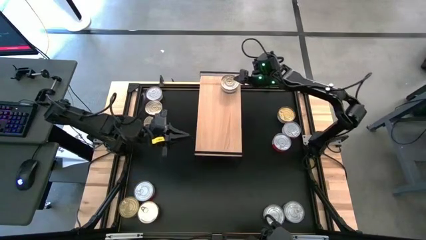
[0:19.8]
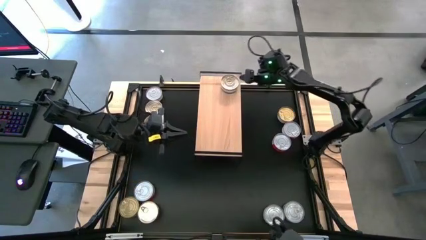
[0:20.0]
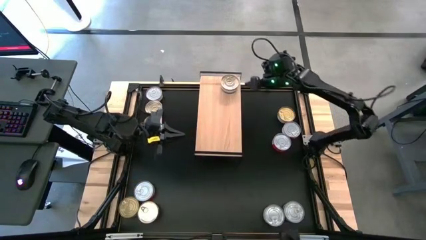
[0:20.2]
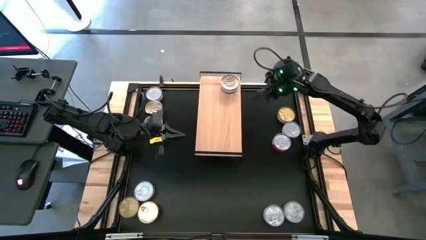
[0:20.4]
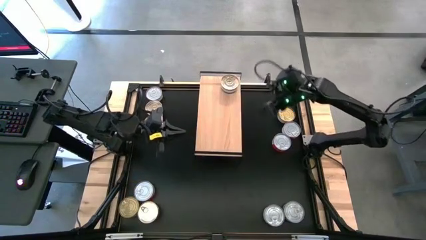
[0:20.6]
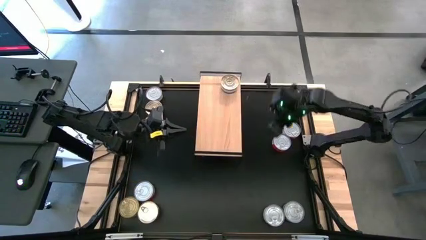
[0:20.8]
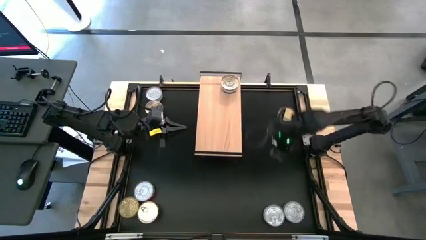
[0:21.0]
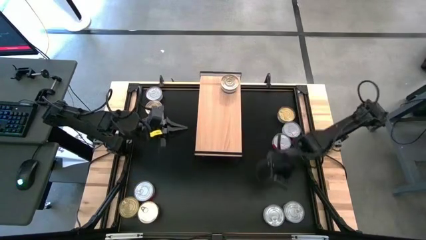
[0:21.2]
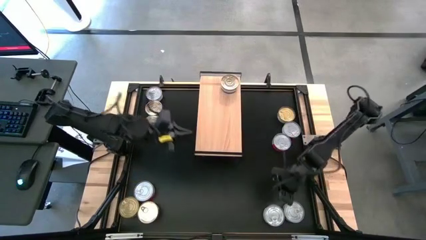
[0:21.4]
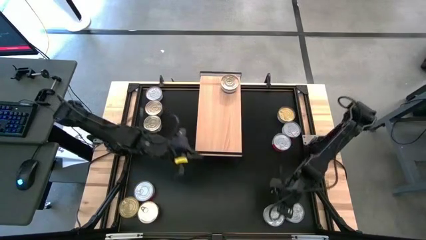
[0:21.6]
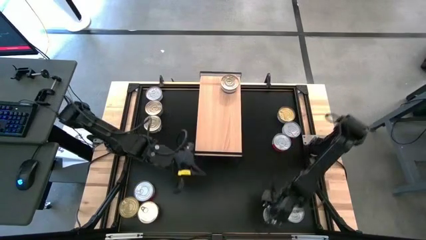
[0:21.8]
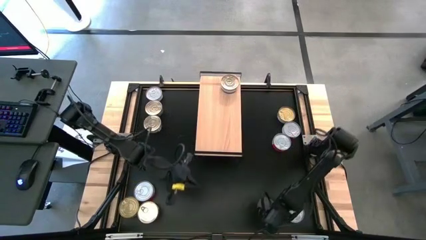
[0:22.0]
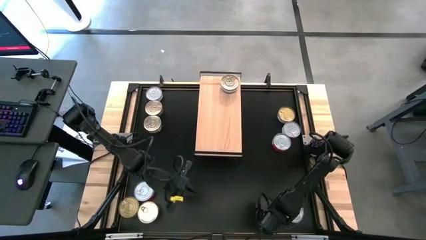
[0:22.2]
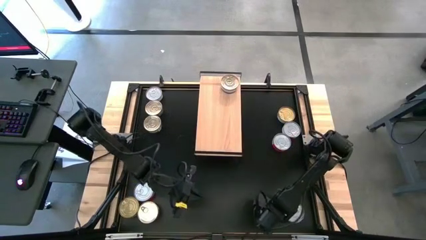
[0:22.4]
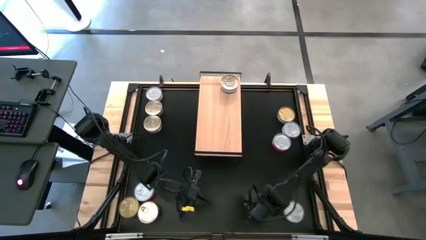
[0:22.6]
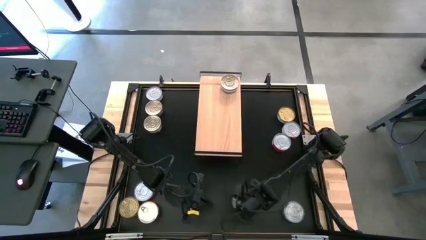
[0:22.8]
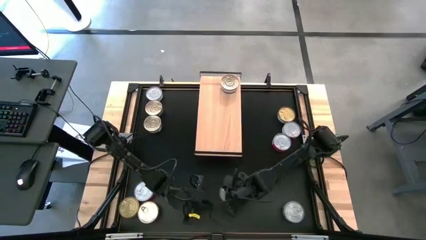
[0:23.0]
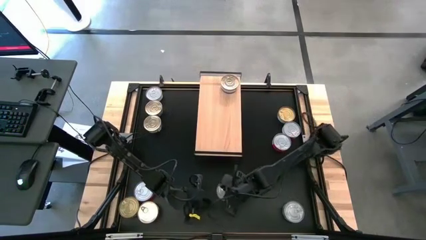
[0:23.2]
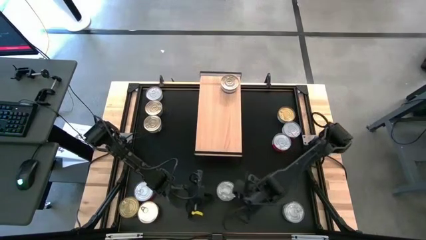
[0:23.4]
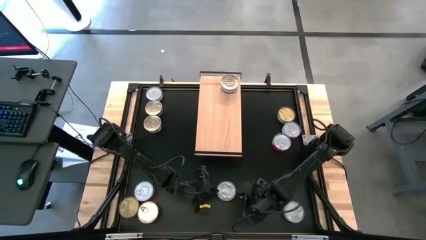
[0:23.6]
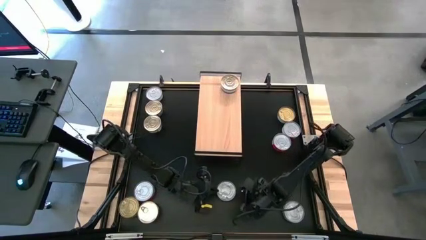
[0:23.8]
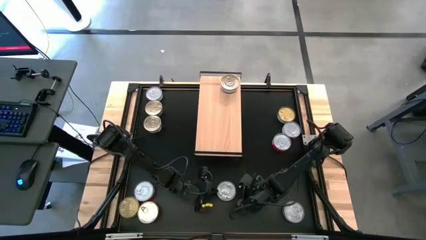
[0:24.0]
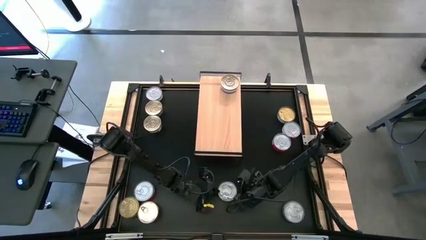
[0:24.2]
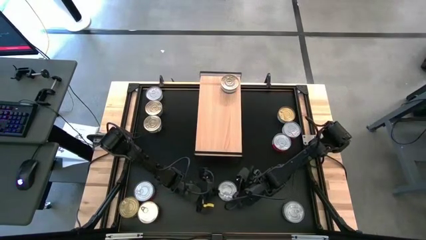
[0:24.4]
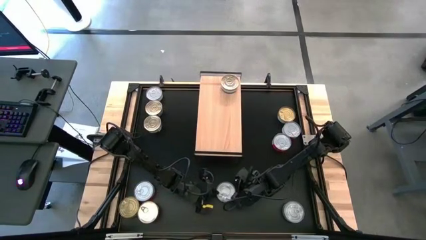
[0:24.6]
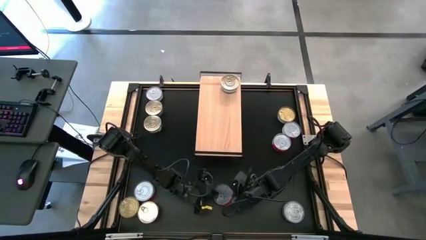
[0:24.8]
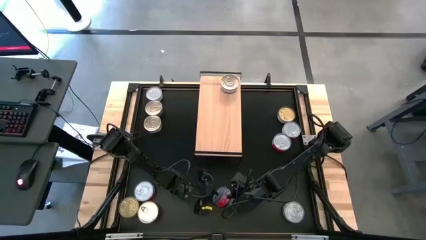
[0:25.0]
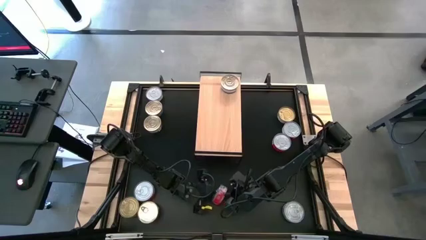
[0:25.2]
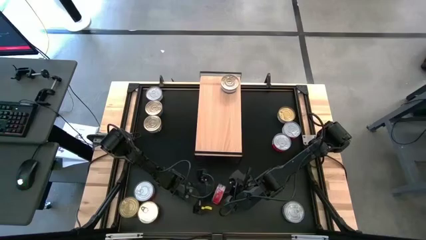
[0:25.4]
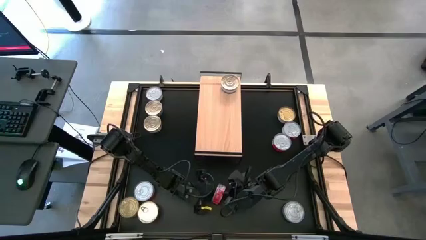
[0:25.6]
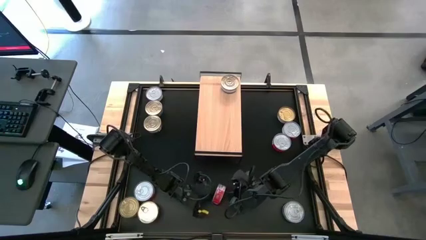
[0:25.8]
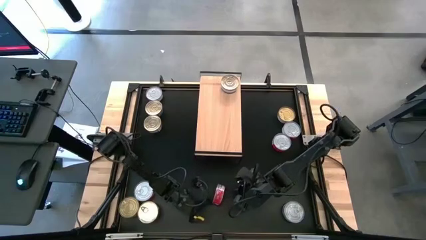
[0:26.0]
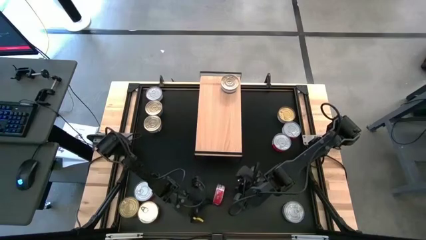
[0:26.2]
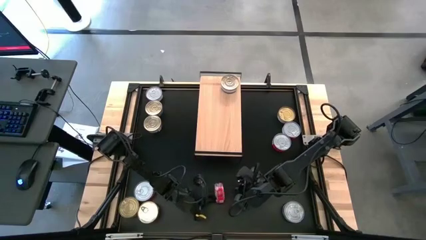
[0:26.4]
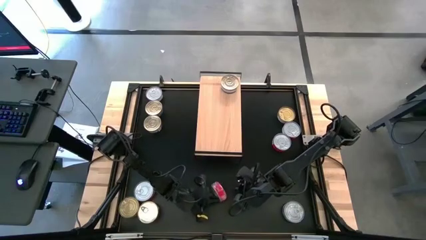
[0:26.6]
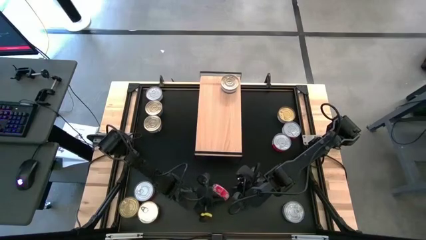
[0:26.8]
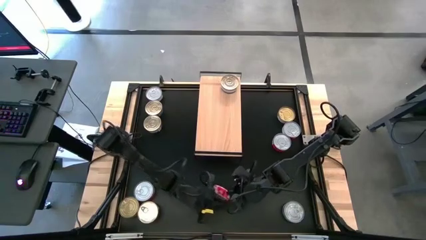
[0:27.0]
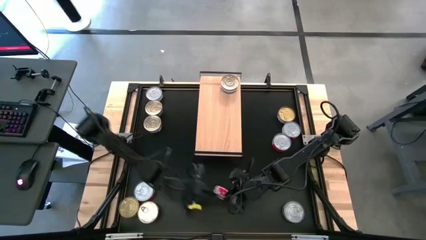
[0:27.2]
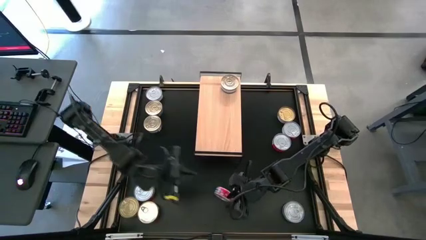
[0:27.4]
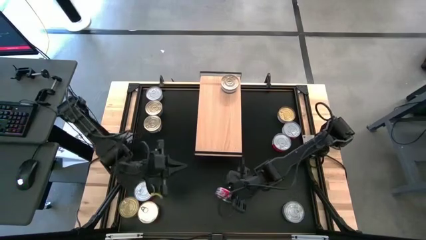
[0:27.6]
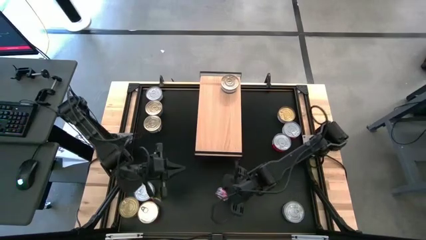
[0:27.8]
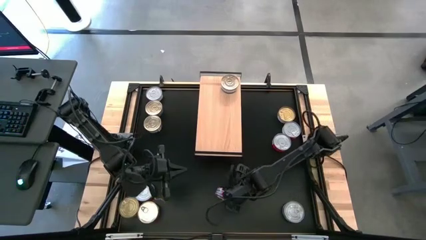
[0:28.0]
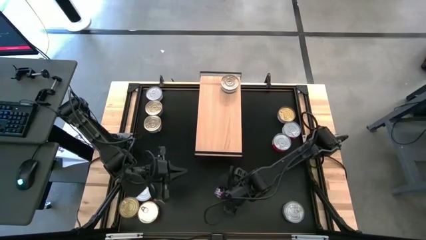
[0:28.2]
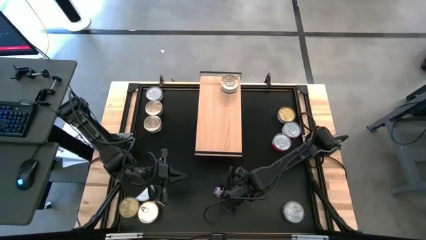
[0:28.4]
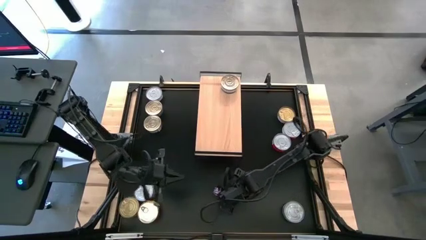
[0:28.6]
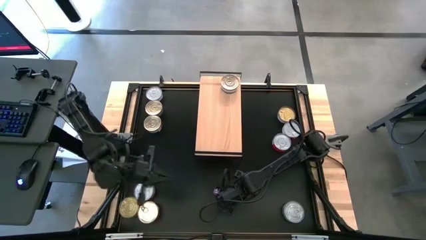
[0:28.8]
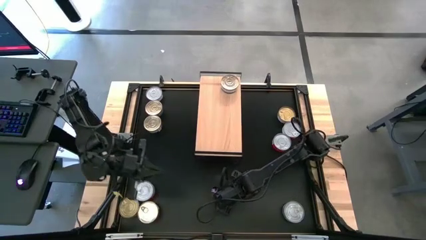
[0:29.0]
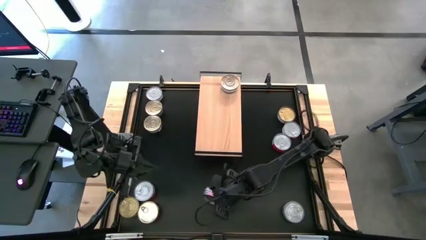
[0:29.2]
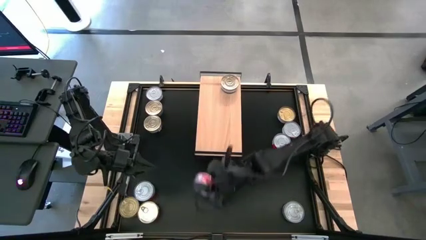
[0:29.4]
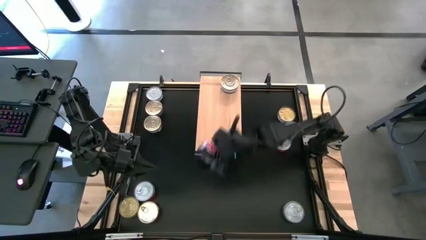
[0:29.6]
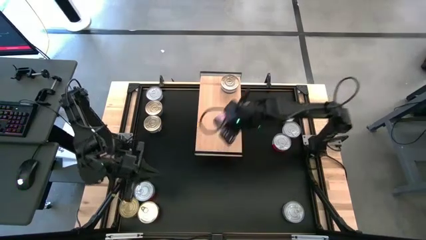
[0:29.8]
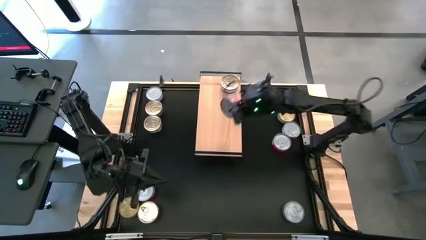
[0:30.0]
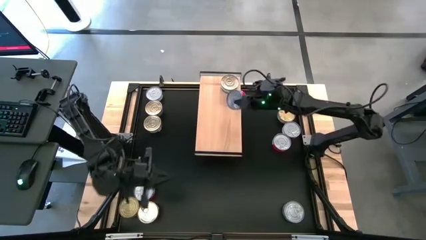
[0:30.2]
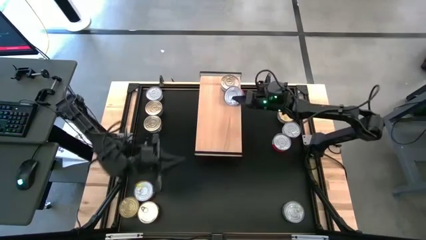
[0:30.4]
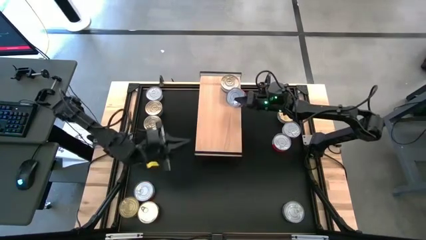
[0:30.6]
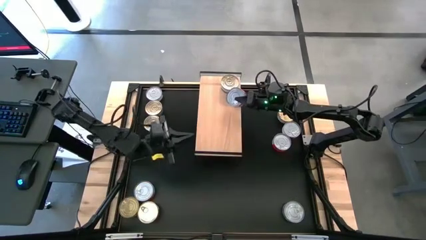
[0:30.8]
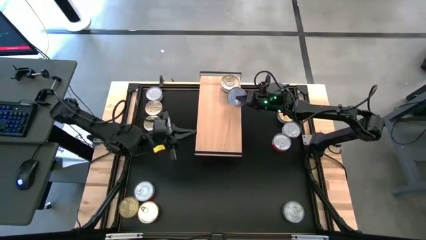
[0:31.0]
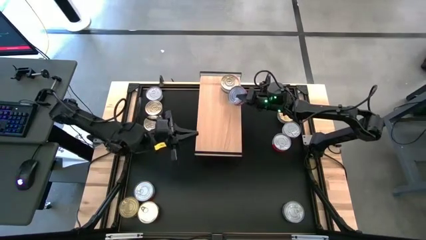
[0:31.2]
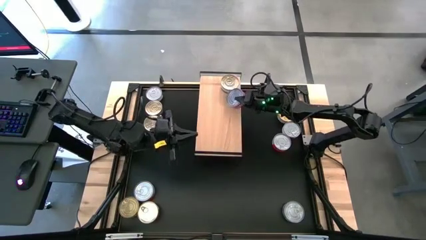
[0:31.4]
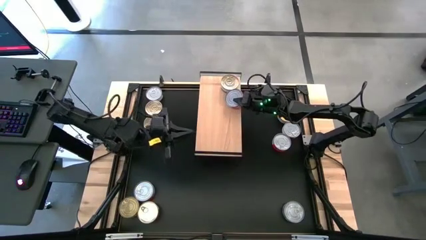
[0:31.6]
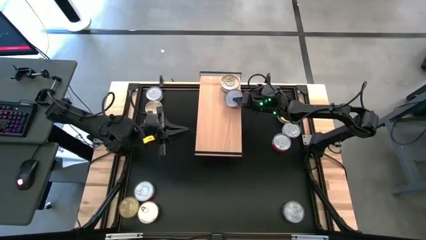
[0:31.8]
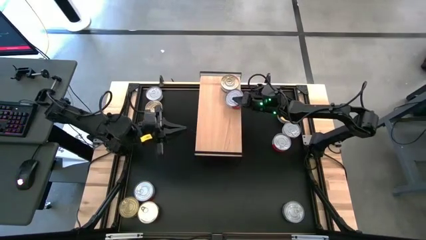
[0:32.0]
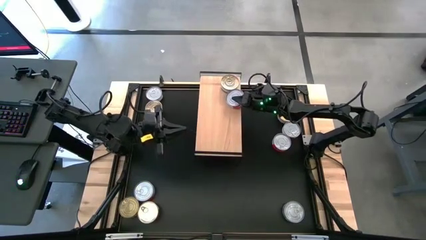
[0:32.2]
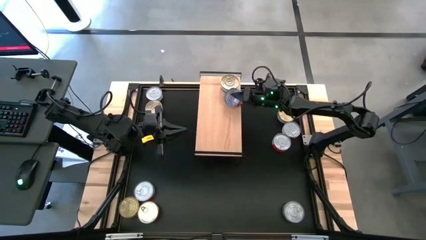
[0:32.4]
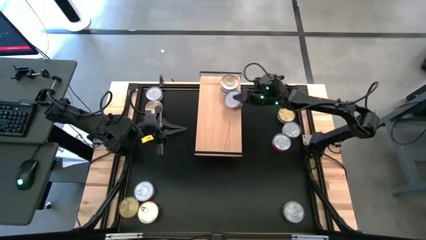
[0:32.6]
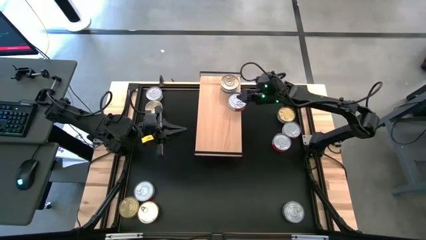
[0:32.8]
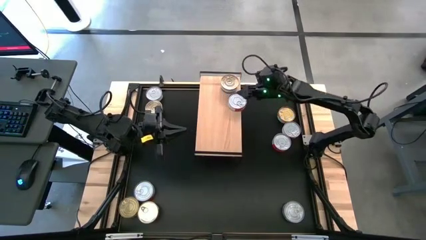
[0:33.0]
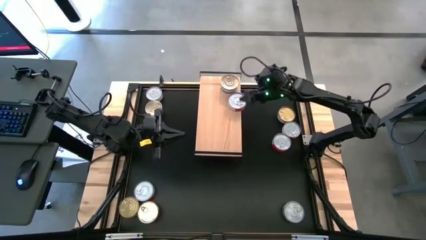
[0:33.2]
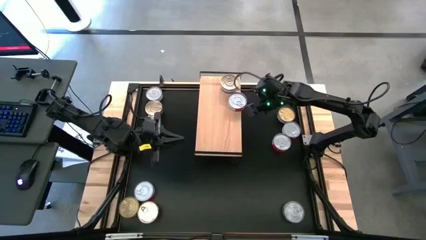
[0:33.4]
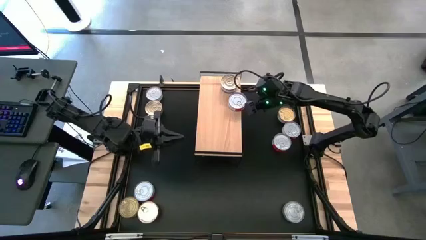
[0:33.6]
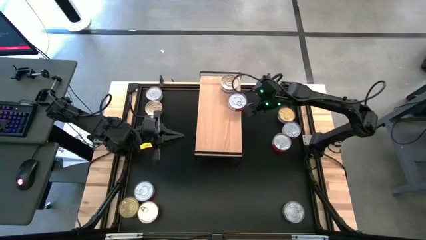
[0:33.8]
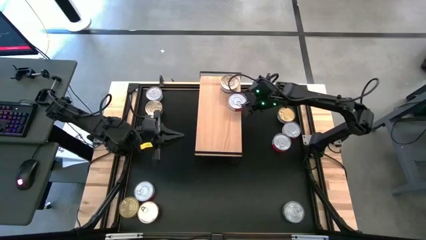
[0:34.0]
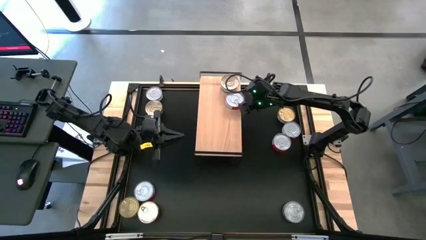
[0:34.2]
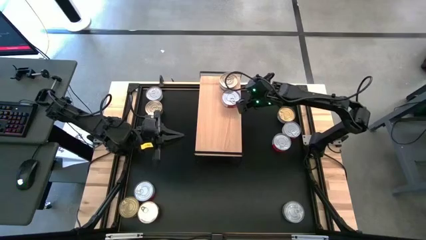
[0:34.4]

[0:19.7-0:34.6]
Task: Stack canned seafood by type on shelf
Put the red tuna can on the shelf

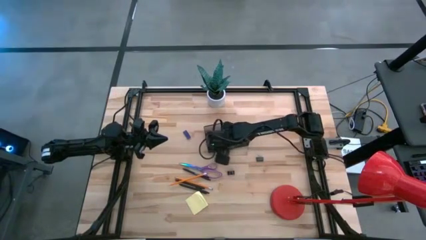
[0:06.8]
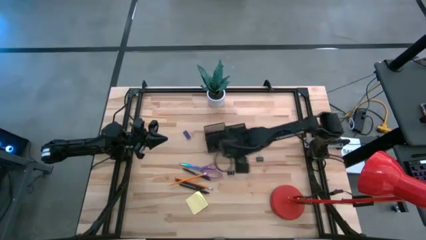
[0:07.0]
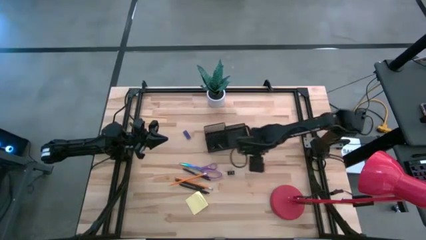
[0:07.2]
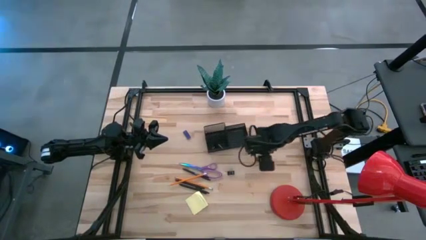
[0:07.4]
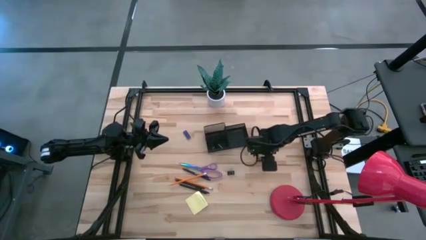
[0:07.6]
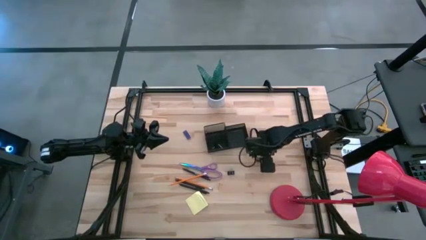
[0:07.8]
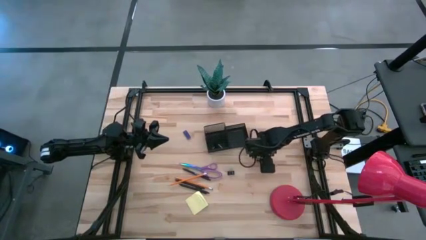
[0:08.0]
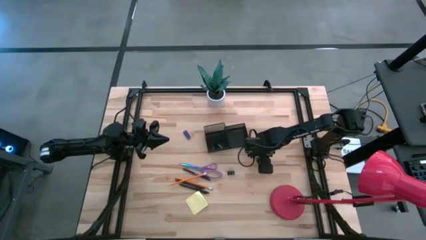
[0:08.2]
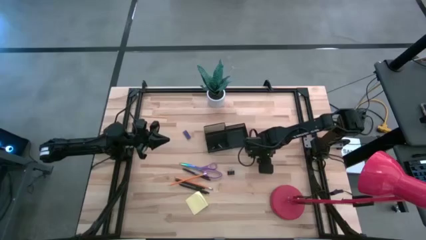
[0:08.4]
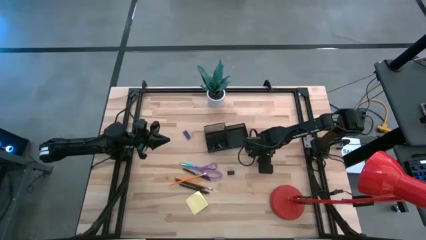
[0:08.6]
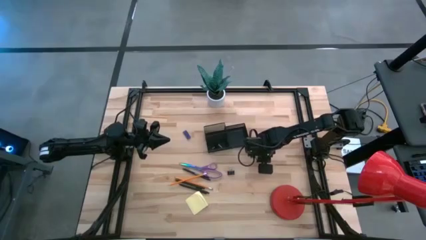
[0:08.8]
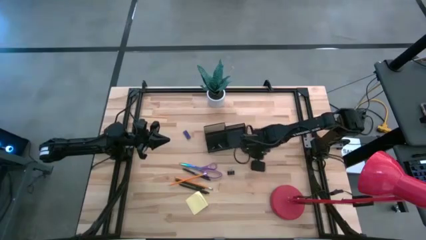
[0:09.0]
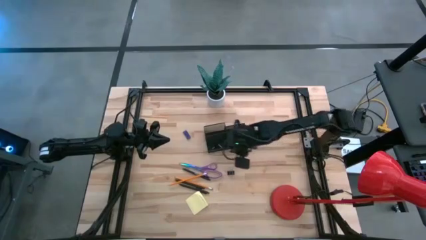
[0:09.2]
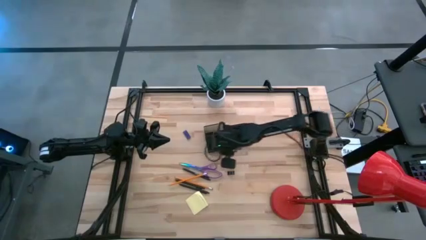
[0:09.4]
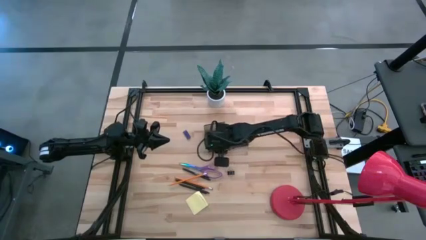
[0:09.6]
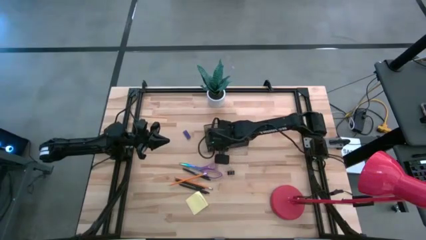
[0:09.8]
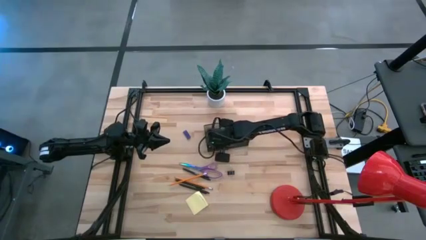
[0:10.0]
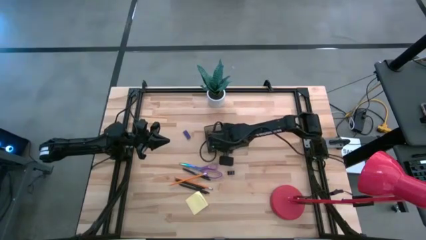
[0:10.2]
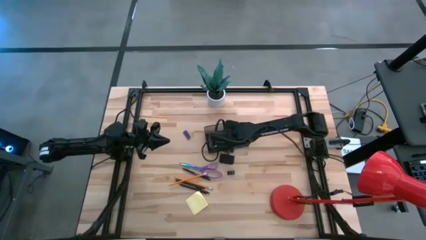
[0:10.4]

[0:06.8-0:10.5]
Task: Pick and place office supplies into organizer
Put the right black clip into the black organizer
